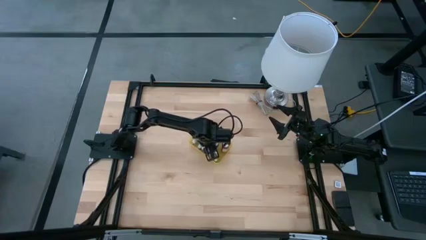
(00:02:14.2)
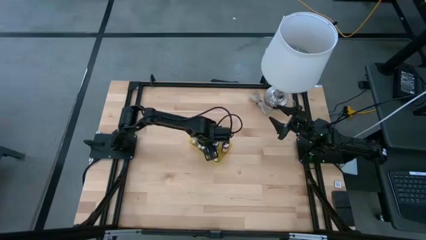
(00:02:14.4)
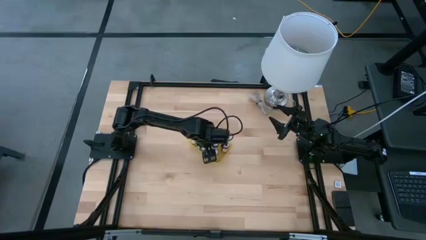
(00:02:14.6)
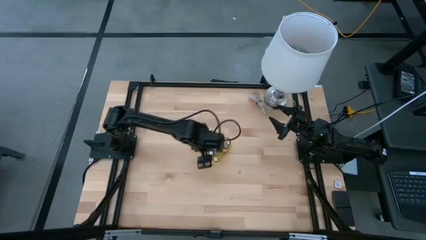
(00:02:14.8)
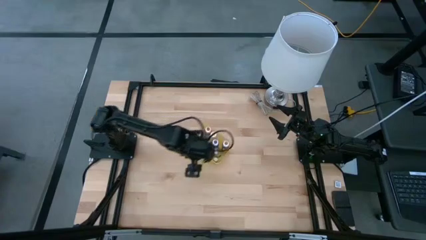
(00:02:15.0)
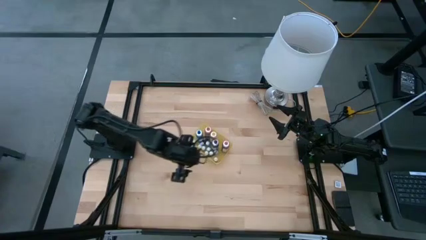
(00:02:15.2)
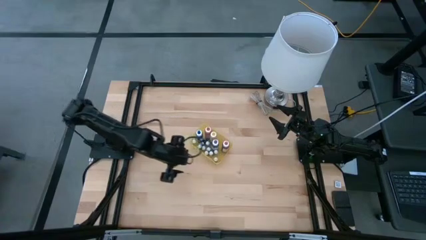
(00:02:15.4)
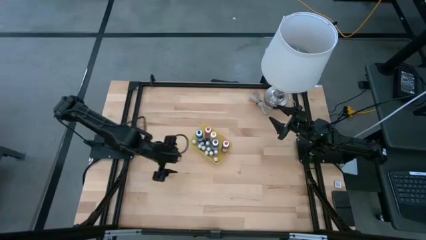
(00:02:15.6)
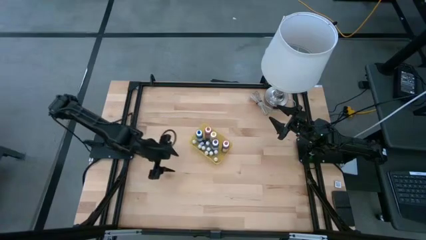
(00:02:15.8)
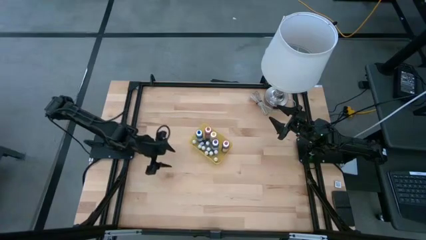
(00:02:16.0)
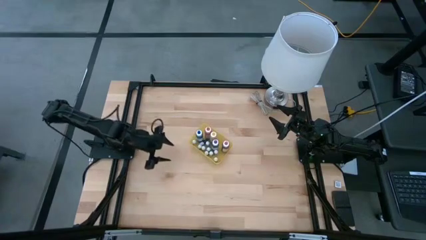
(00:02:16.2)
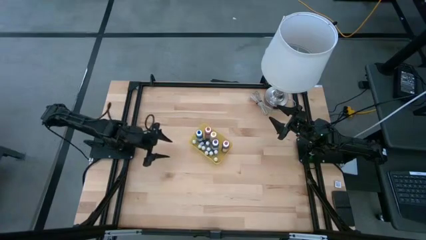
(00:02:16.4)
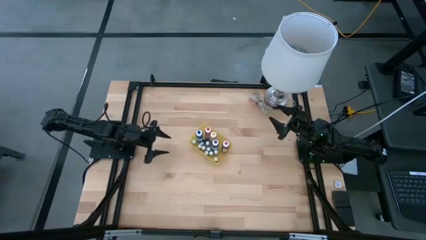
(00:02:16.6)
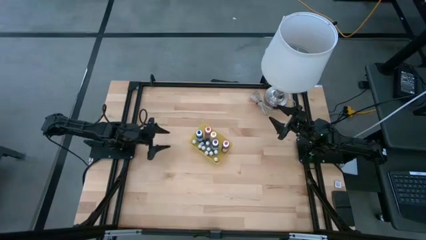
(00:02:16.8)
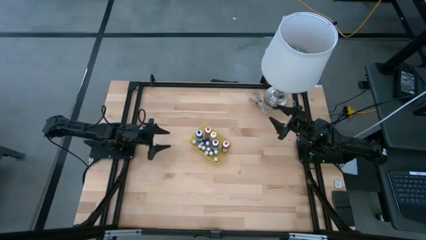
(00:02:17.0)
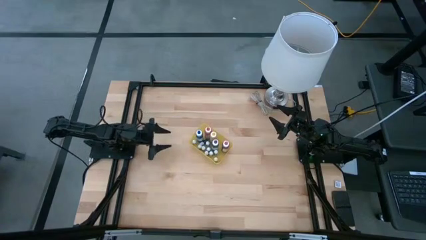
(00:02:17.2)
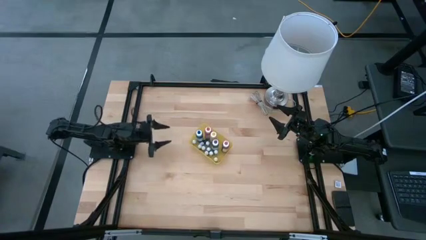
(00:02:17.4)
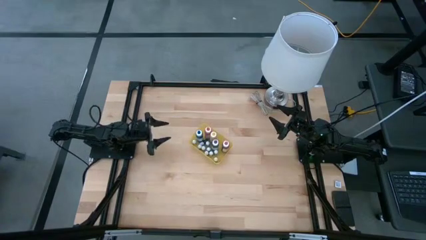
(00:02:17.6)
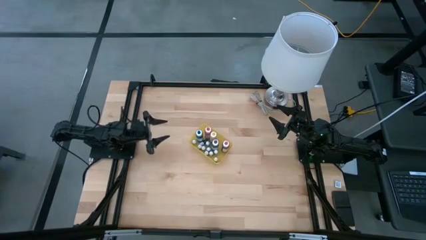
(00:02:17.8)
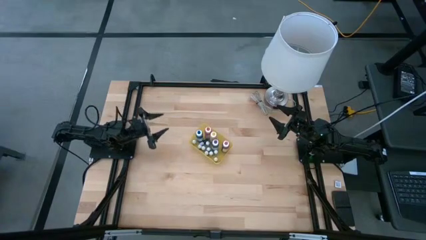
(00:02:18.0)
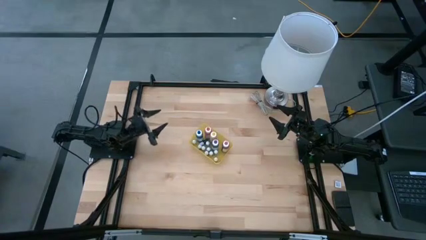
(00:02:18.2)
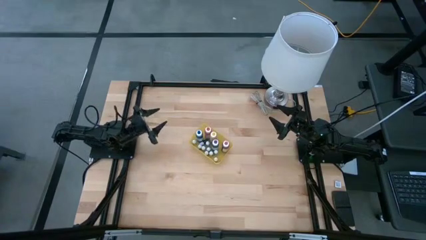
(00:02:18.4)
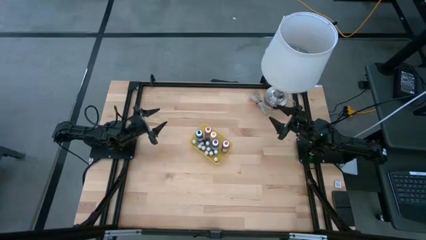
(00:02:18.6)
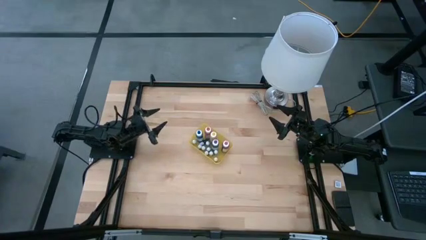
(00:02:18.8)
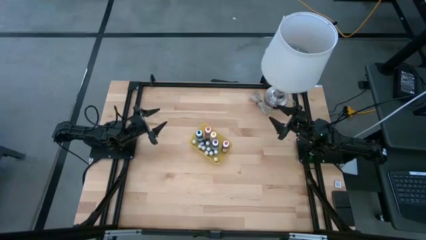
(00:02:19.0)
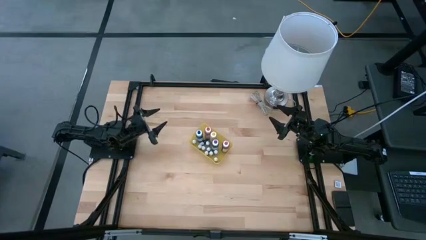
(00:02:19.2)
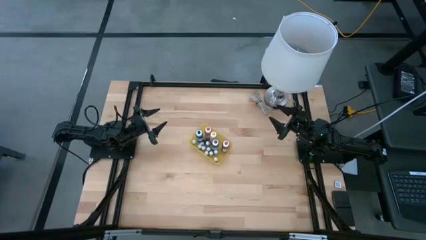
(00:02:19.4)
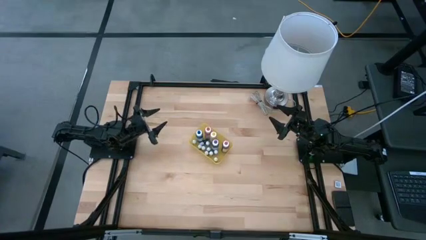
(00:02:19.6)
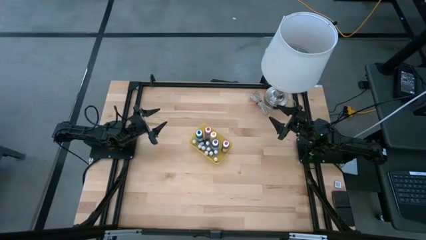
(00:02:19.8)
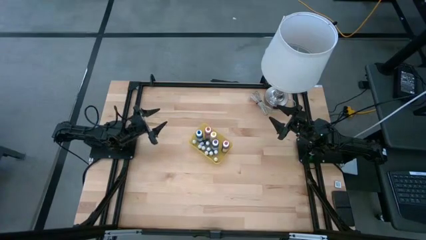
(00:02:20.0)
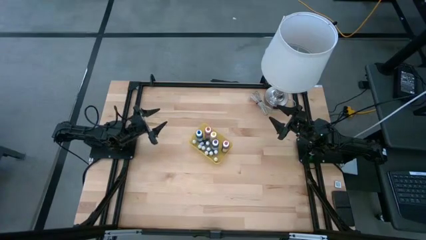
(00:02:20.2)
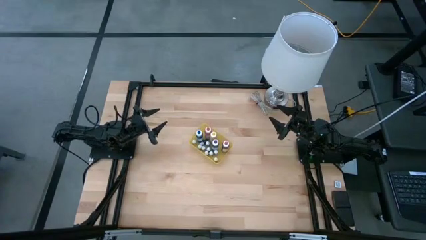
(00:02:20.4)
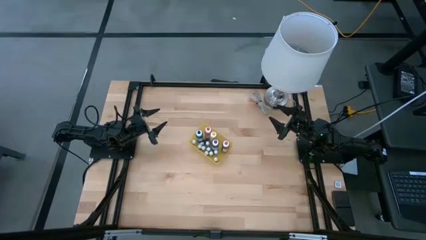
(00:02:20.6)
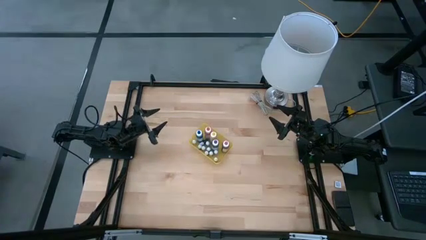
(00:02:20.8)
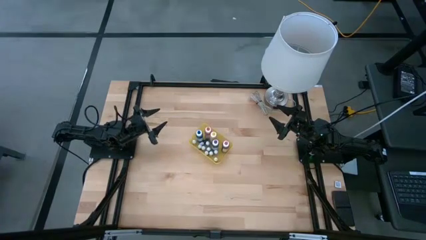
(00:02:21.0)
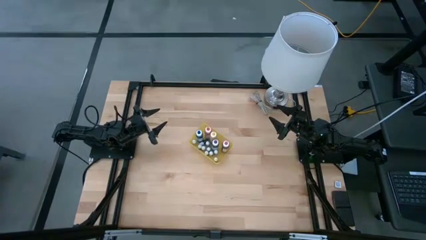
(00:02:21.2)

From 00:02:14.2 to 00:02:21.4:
Task: Pick & Place food coloring
Return to Home Position

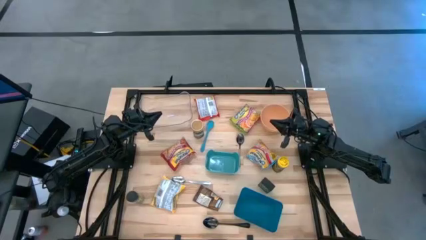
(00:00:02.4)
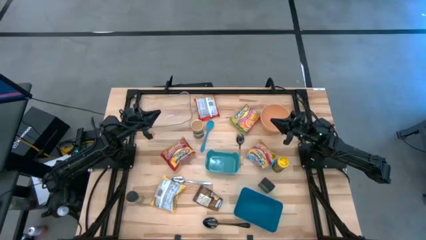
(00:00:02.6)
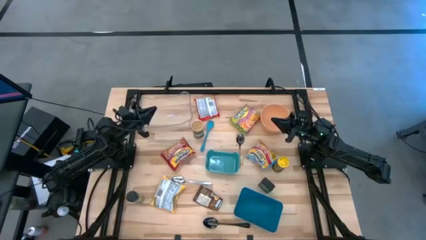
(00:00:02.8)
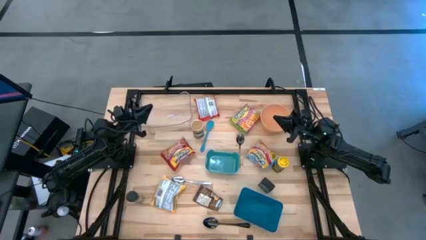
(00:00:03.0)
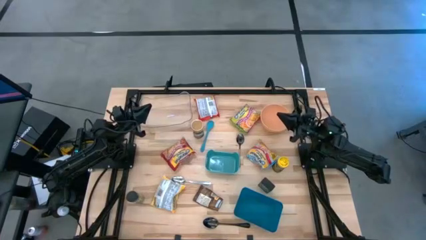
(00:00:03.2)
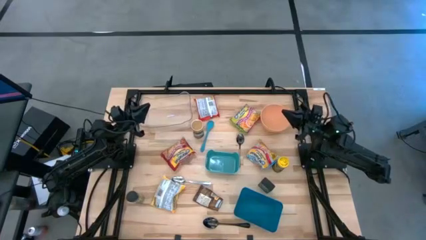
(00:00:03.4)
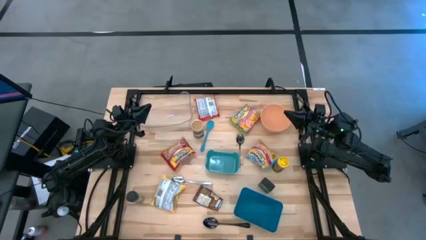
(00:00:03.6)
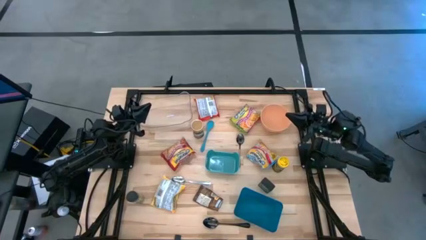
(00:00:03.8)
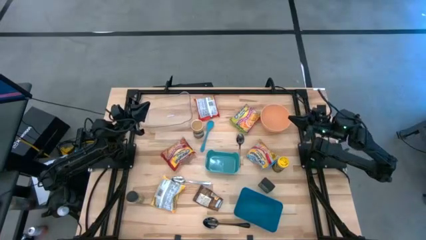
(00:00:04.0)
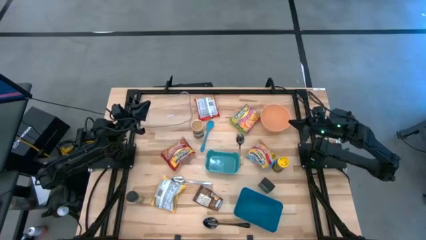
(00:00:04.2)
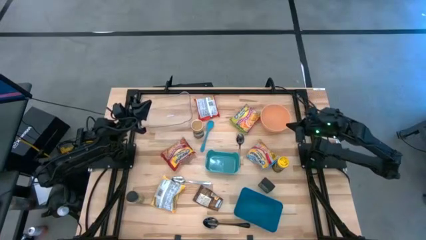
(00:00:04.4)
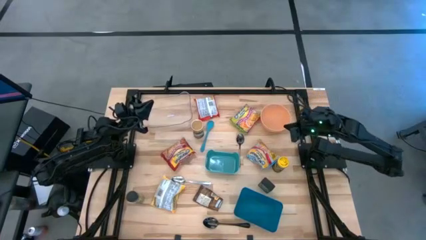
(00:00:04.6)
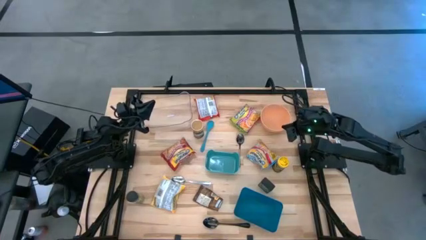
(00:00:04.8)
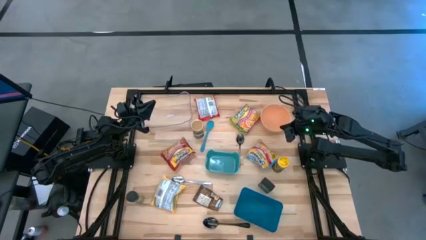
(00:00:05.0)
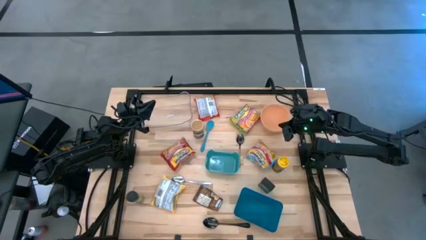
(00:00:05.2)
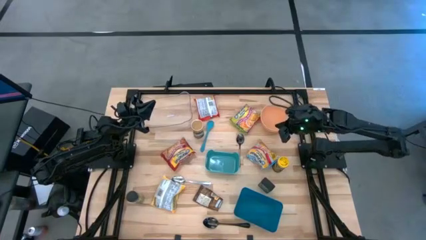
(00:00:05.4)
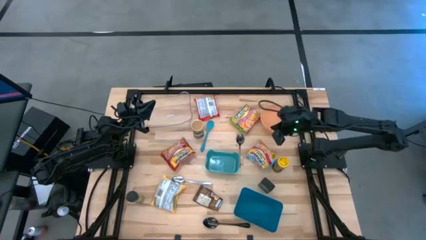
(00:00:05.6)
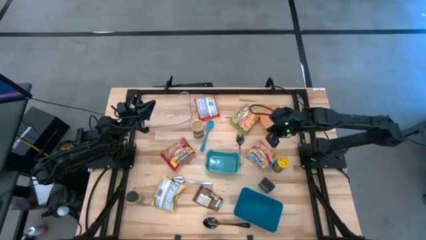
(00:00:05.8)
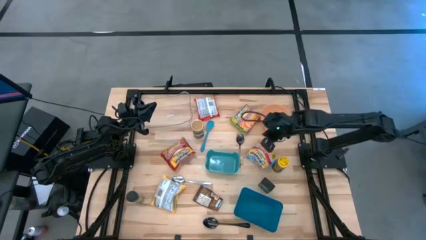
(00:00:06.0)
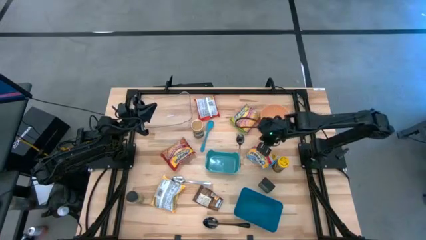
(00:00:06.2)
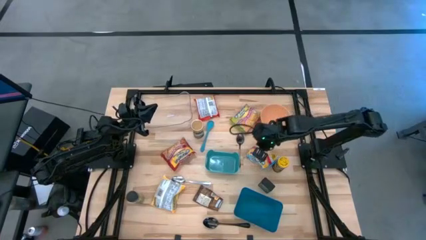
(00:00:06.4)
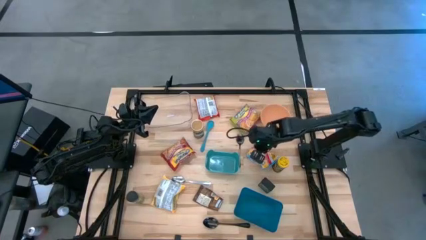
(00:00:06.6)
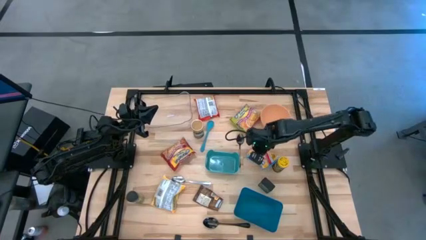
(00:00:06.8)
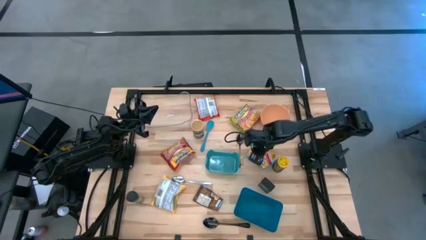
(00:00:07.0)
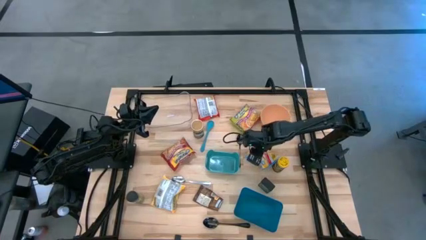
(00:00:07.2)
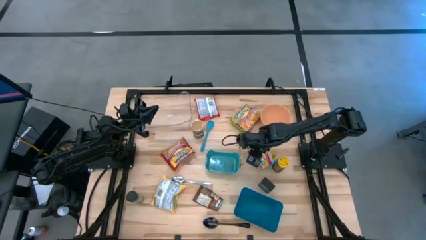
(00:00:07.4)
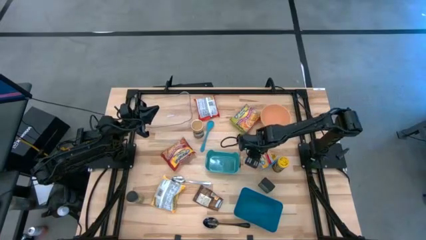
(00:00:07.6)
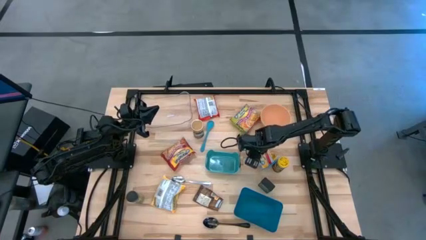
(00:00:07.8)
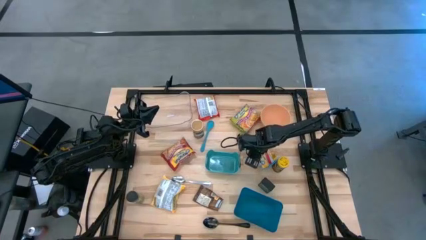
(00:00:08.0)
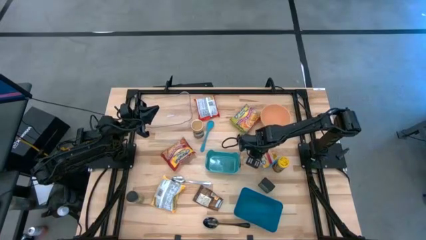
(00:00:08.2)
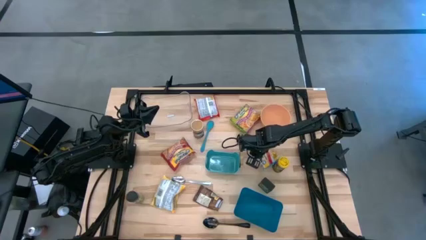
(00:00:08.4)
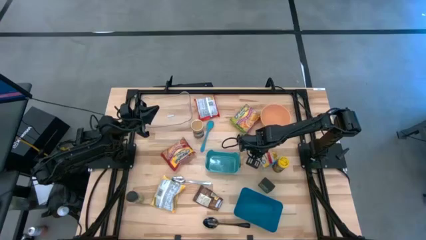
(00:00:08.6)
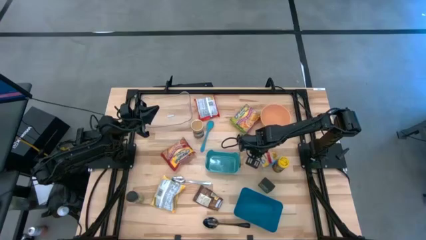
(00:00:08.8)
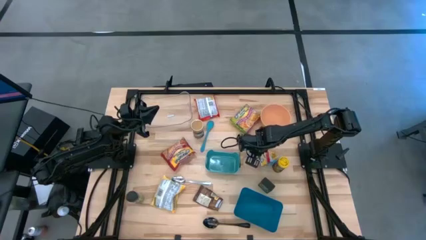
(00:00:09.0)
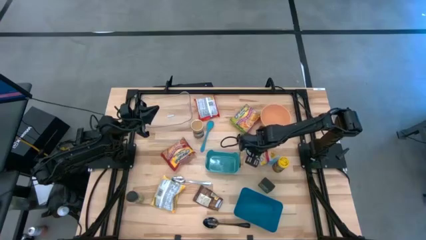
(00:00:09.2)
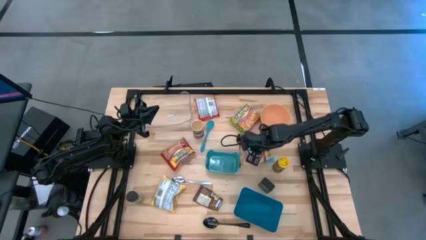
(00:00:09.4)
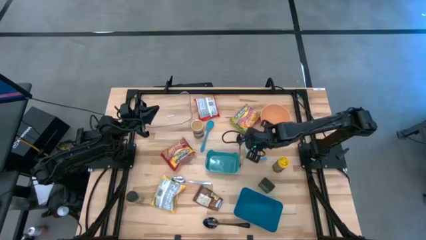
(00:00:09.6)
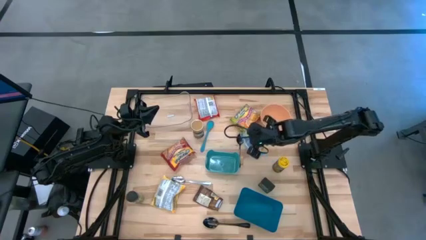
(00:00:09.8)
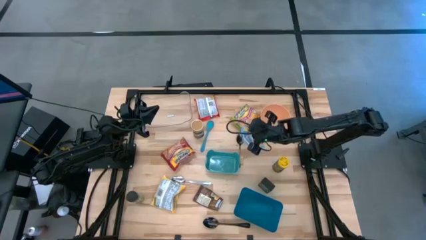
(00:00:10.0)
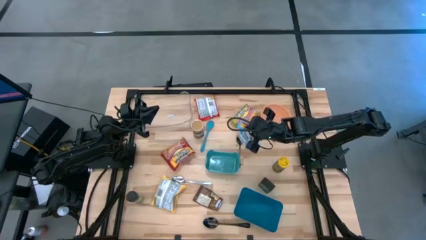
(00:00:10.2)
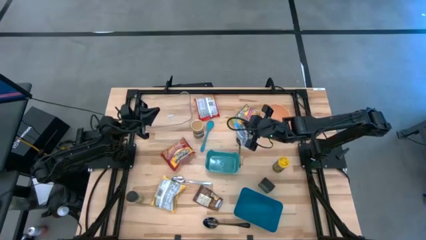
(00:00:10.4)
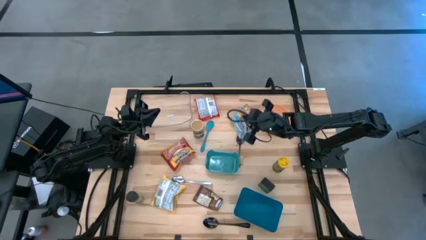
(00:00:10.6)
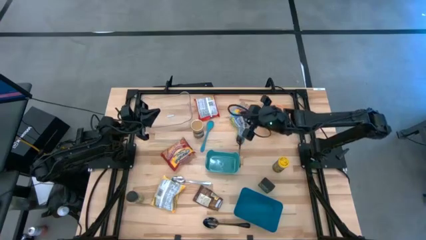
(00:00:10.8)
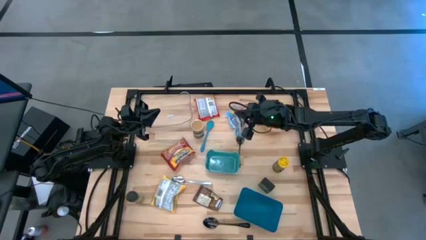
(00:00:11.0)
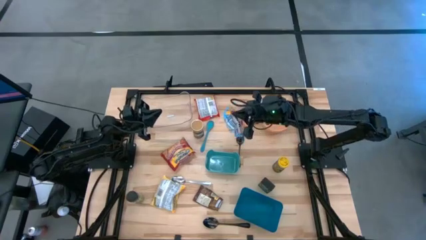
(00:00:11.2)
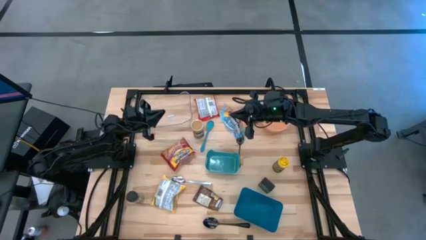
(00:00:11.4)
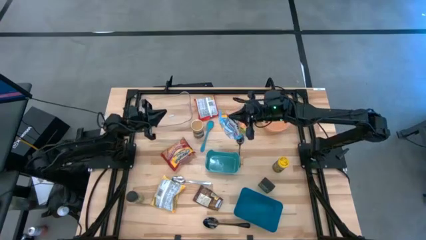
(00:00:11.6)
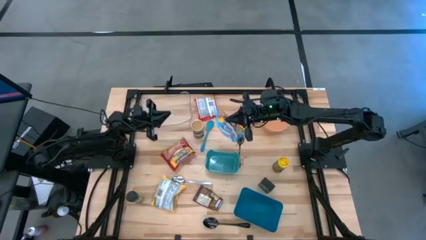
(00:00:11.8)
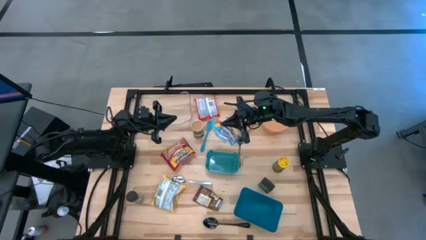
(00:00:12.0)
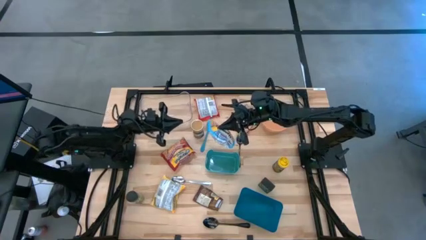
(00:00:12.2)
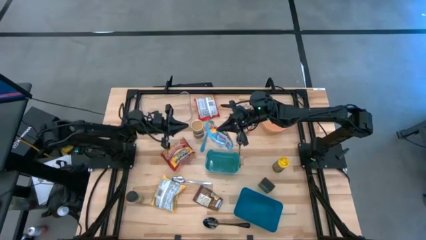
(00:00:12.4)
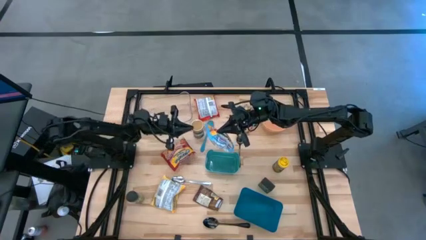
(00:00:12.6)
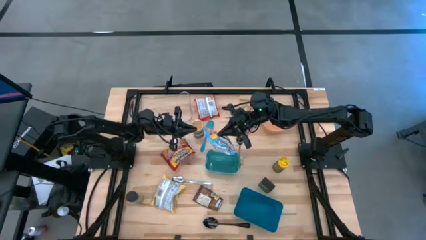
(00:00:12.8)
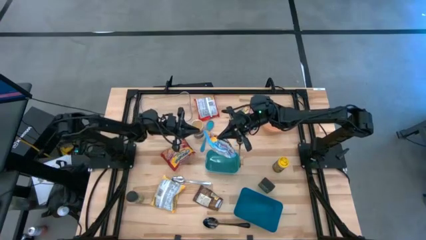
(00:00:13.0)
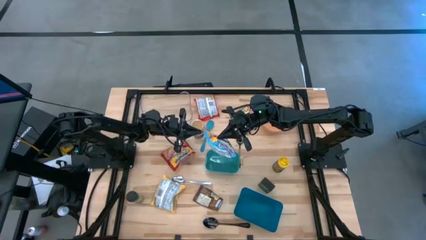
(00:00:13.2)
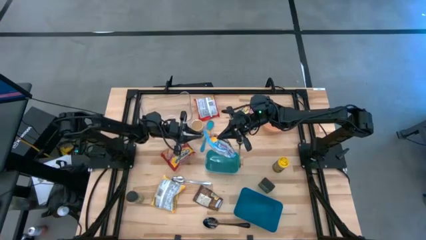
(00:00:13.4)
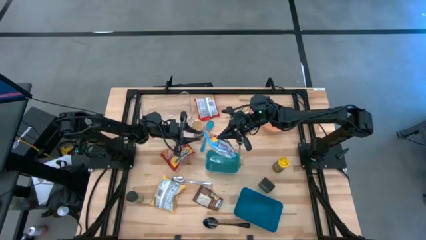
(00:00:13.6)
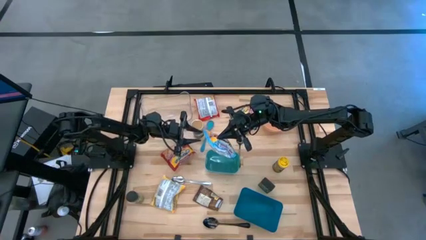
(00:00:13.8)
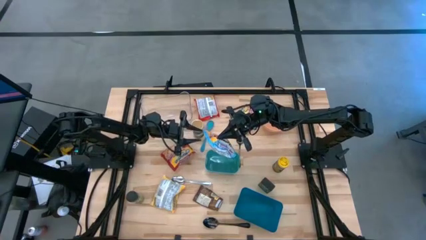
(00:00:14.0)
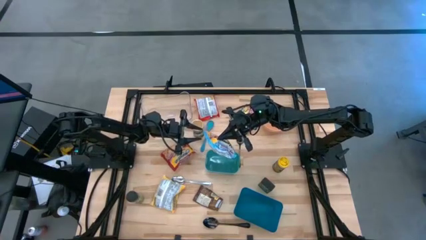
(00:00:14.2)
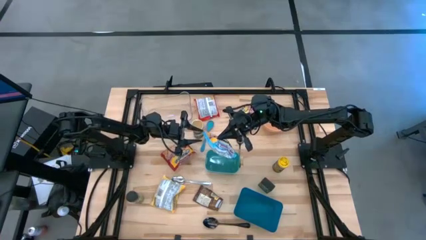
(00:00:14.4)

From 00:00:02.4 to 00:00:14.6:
Task: Pick & Place Food Item
Put the blue noodle pack into the transparent bin
